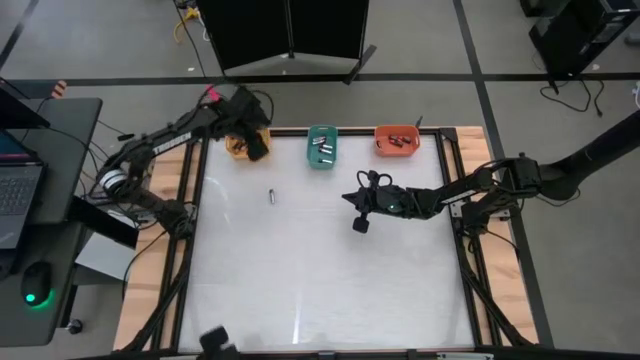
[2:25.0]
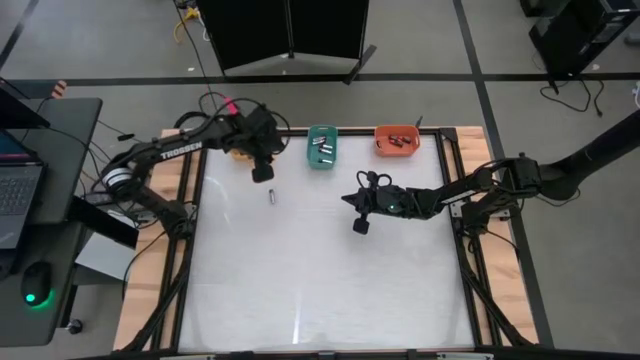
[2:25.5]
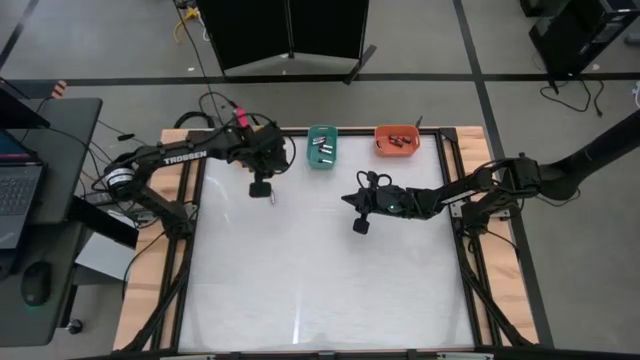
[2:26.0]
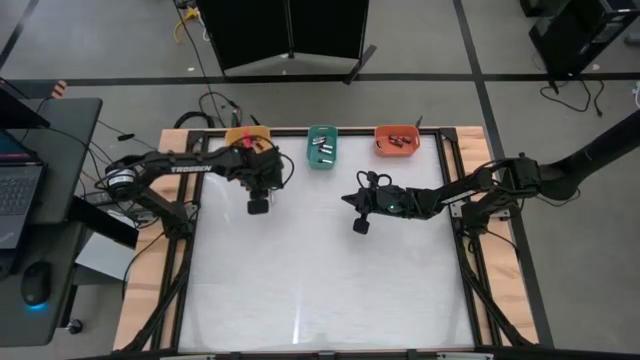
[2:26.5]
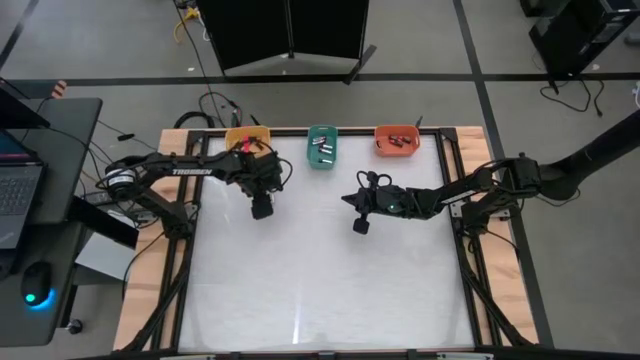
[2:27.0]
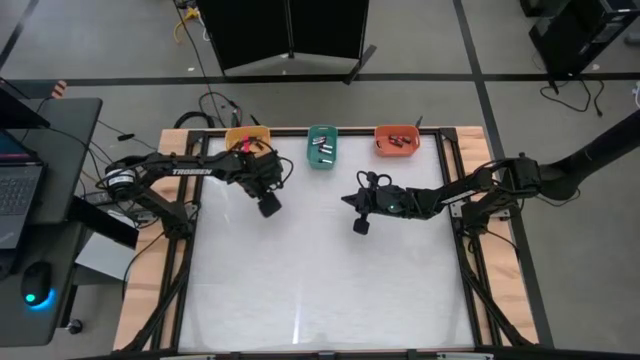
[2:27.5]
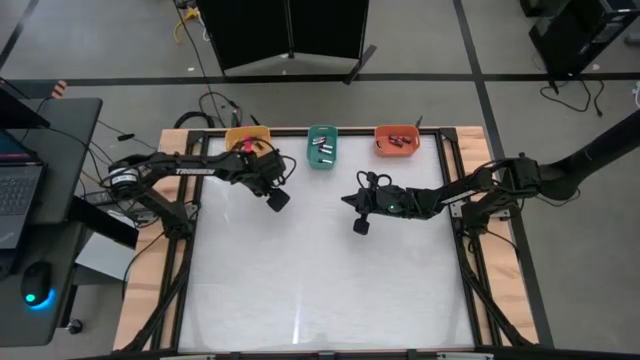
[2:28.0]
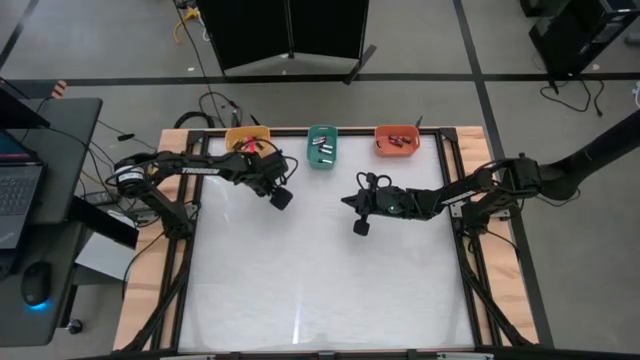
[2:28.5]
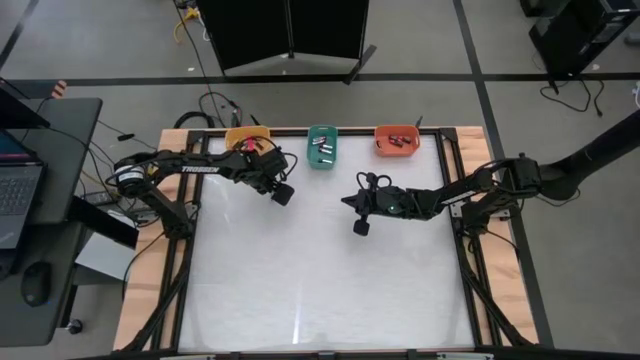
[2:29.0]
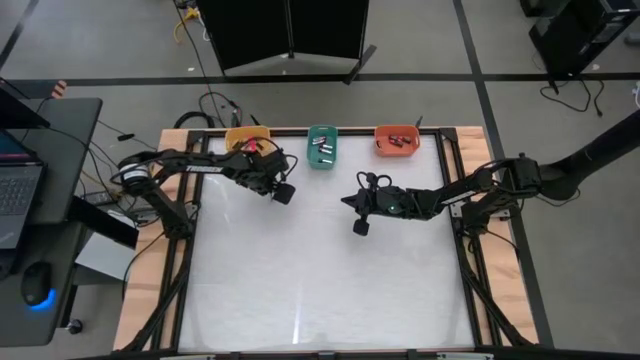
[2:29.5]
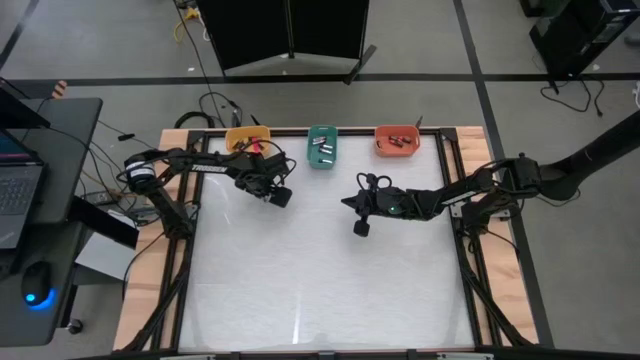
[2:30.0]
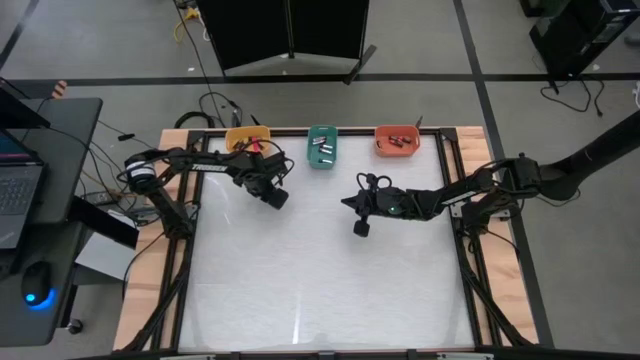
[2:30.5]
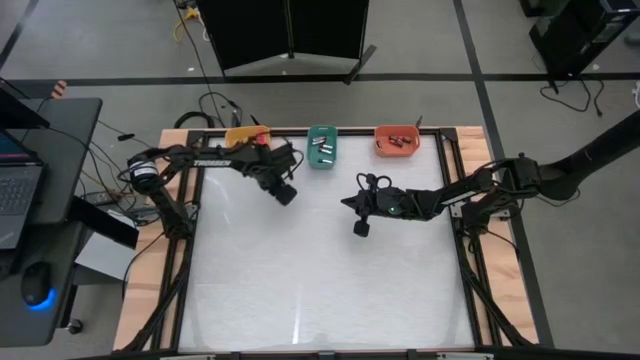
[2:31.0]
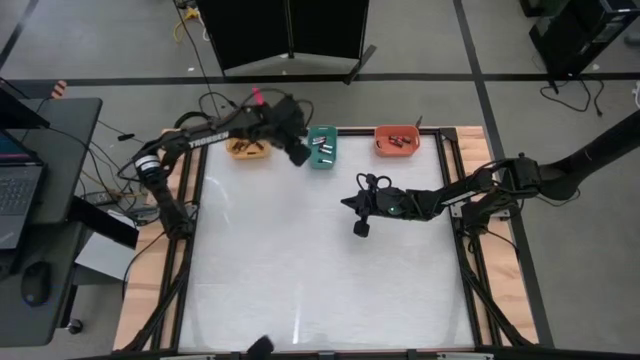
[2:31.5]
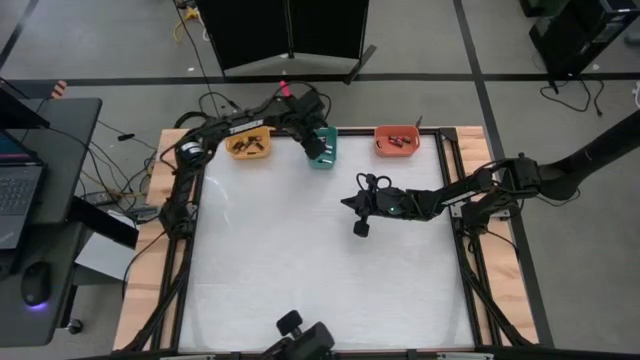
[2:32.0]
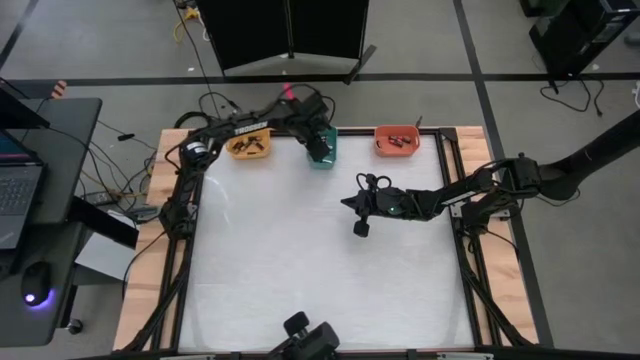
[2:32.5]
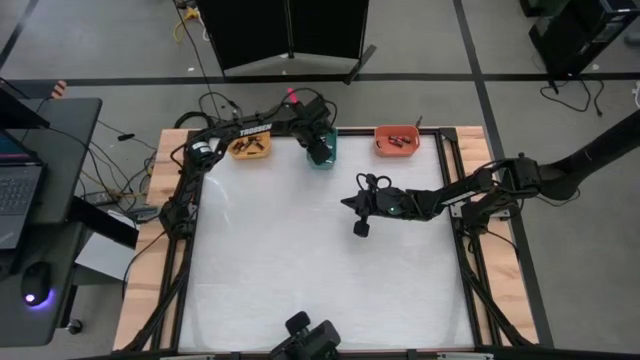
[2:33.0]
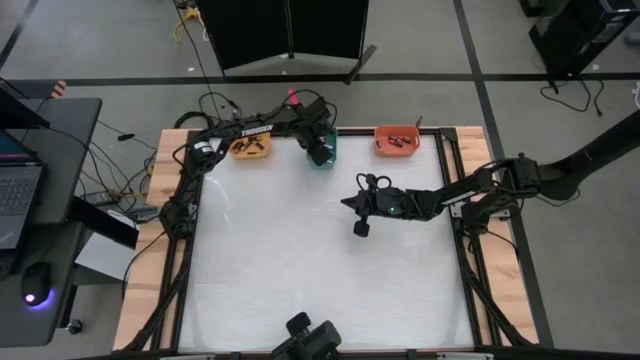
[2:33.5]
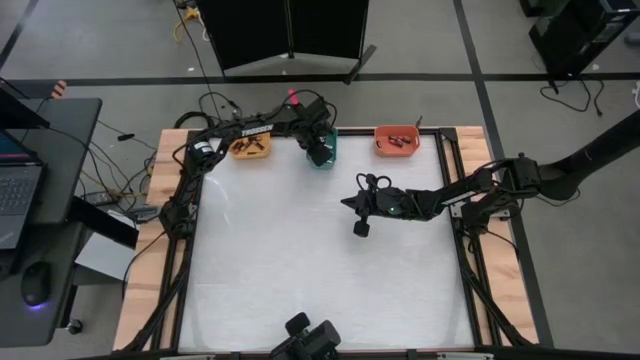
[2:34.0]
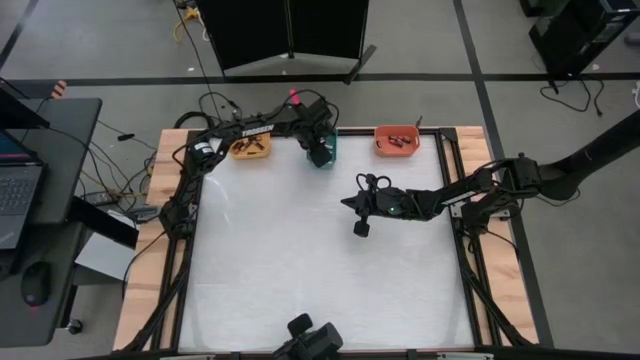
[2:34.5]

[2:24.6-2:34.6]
Task: Sort batteries
Put the silver battery into the green bin

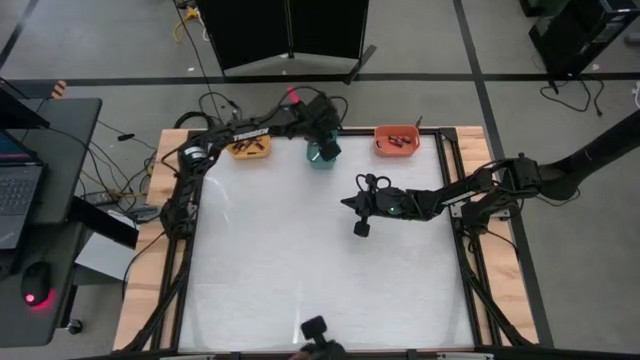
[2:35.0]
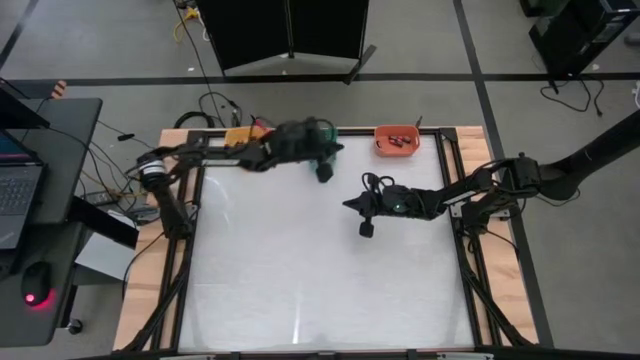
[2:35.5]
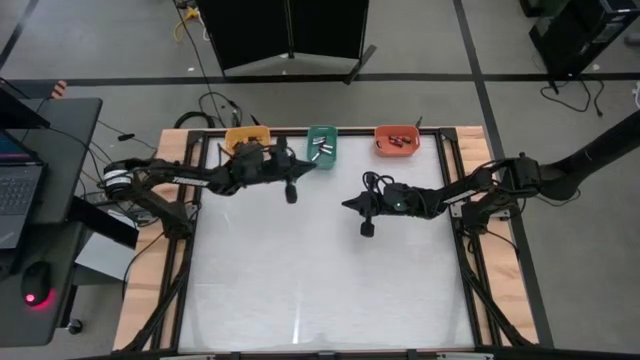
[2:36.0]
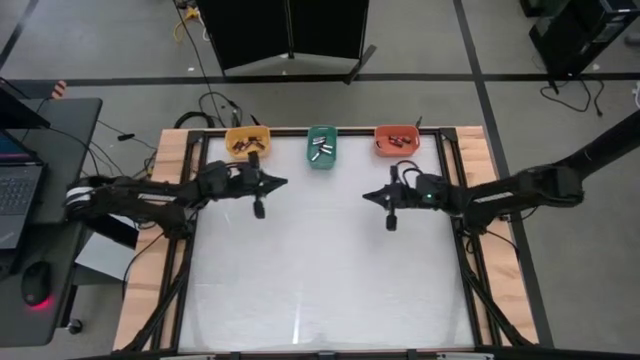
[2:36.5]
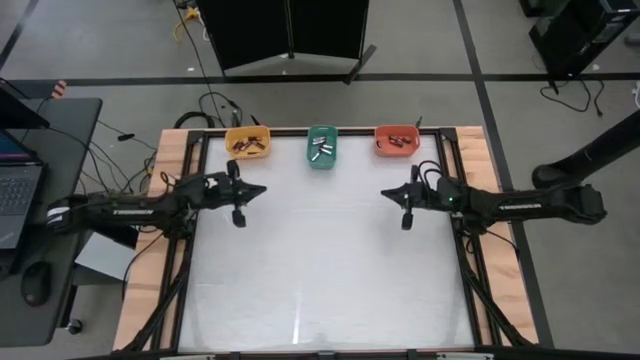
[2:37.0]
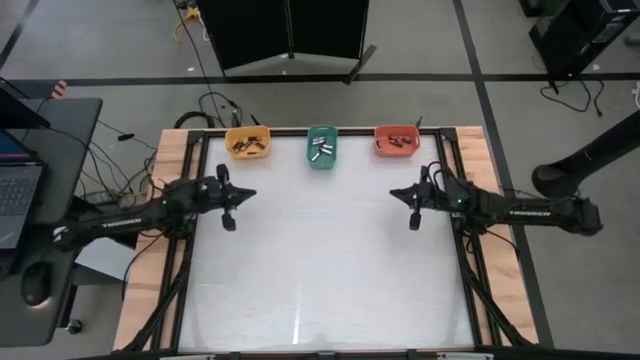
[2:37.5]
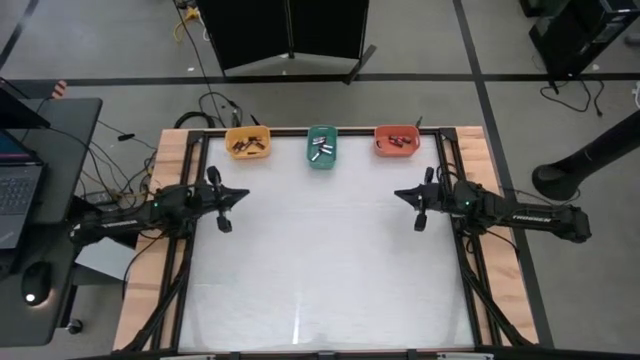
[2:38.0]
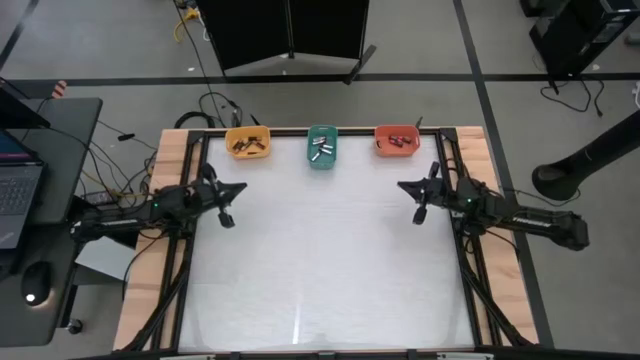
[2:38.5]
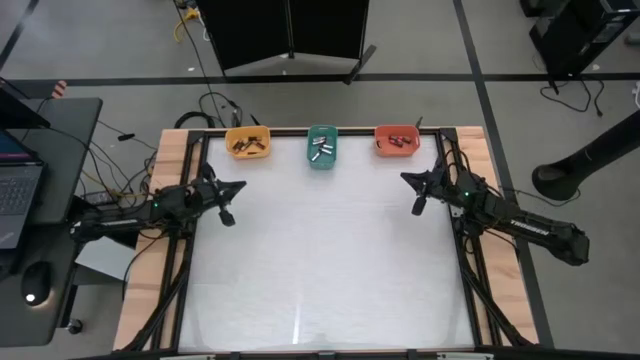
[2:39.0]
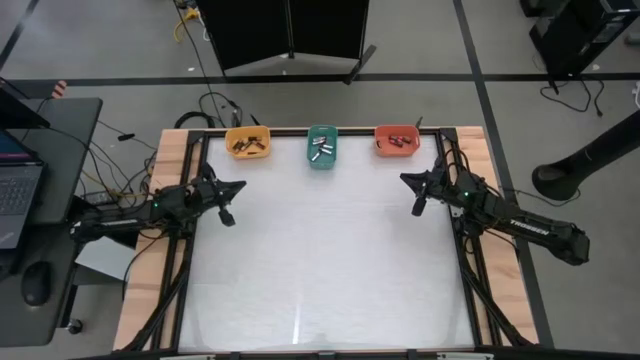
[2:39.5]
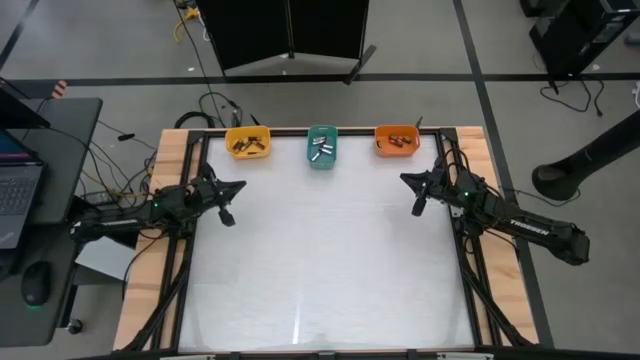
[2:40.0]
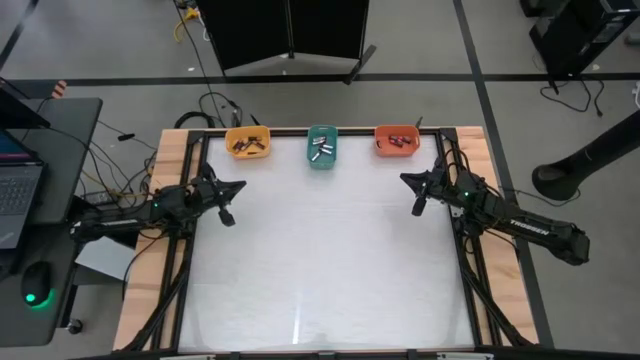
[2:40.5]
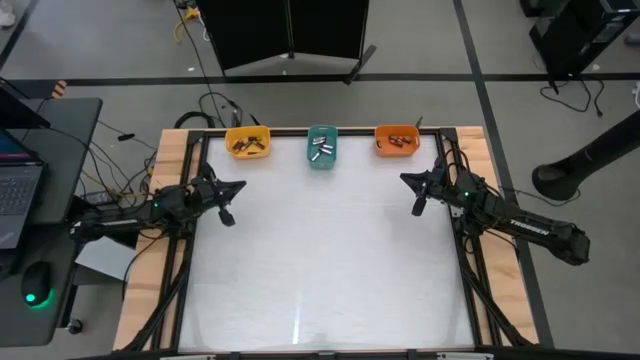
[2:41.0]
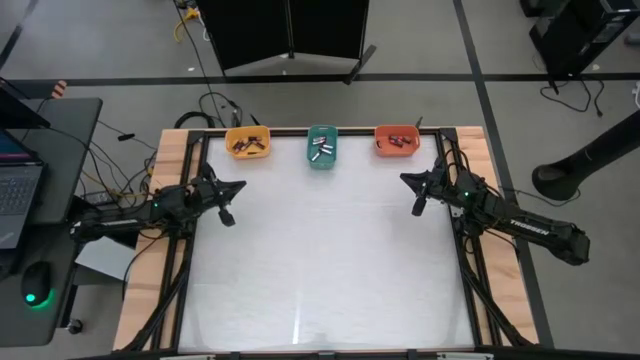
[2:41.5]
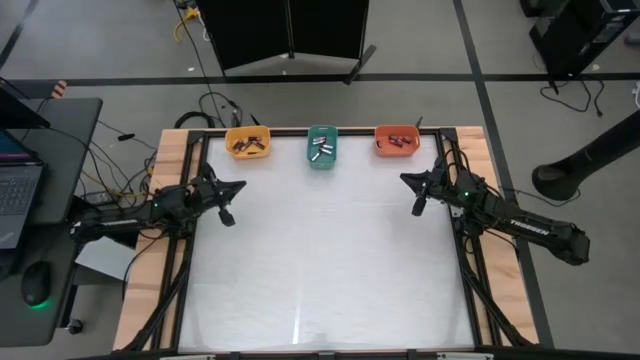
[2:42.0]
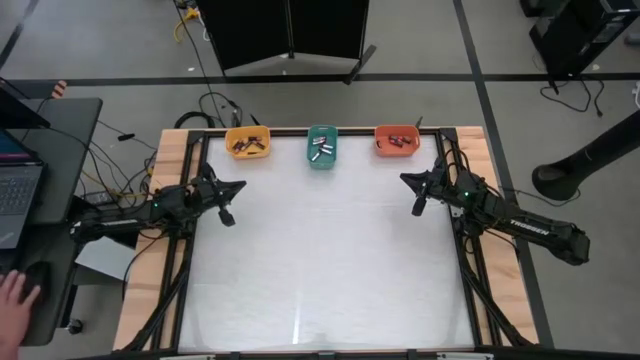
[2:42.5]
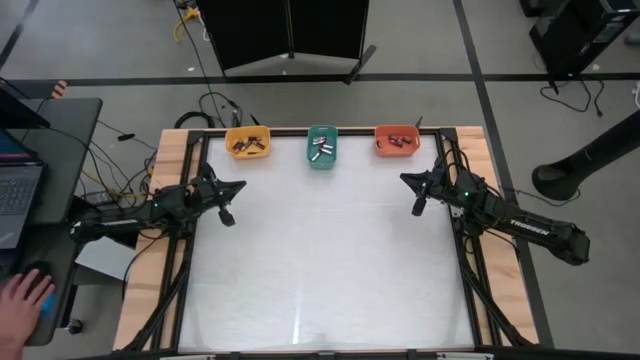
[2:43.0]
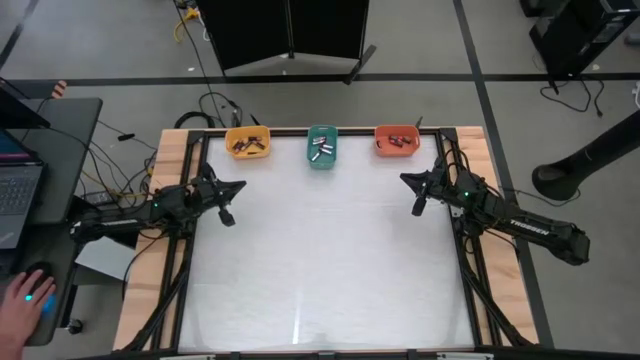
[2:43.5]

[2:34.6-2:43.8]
Return to Home Position

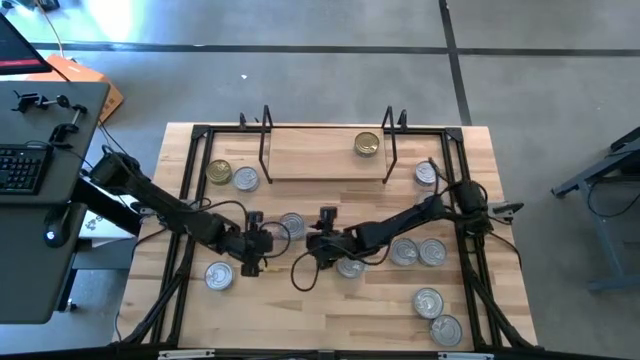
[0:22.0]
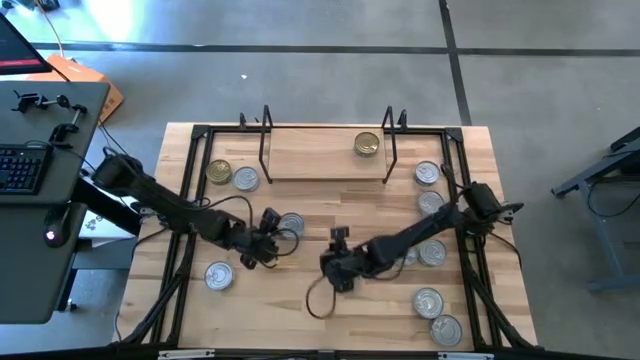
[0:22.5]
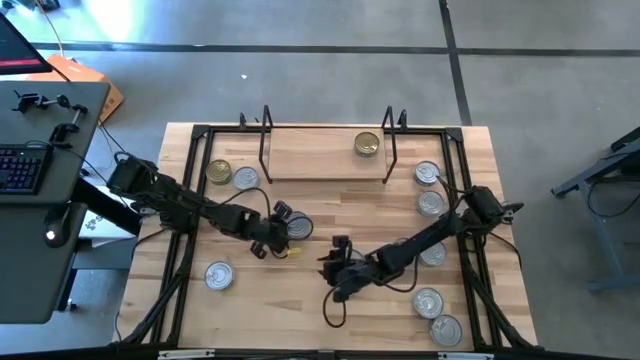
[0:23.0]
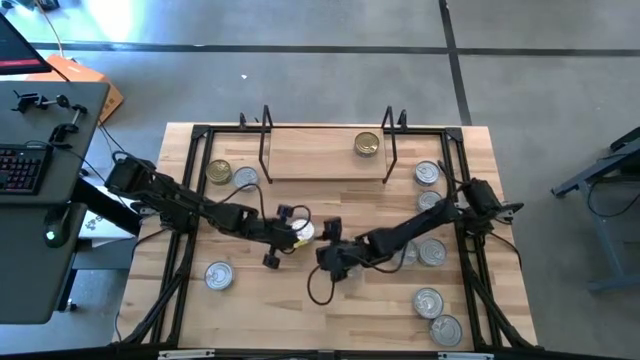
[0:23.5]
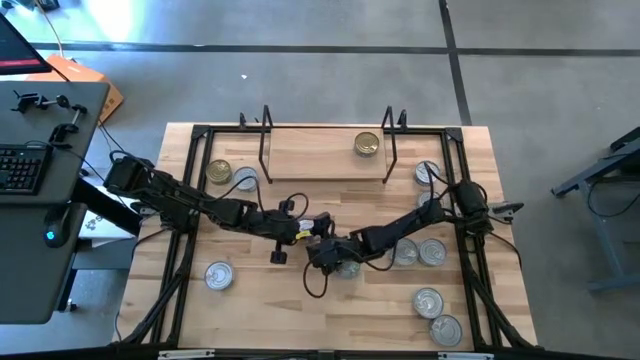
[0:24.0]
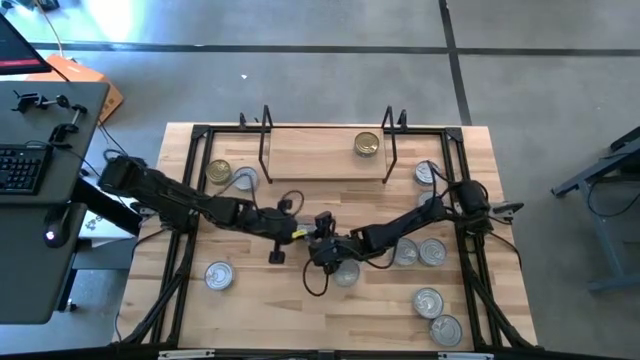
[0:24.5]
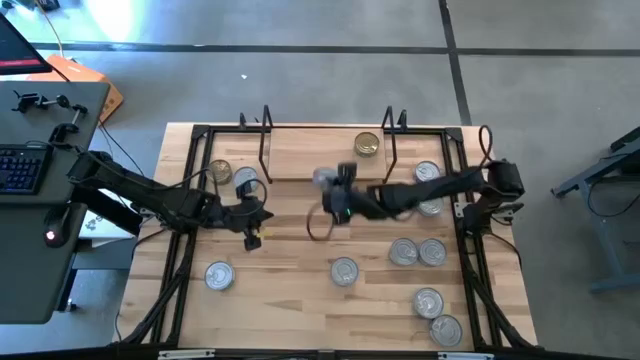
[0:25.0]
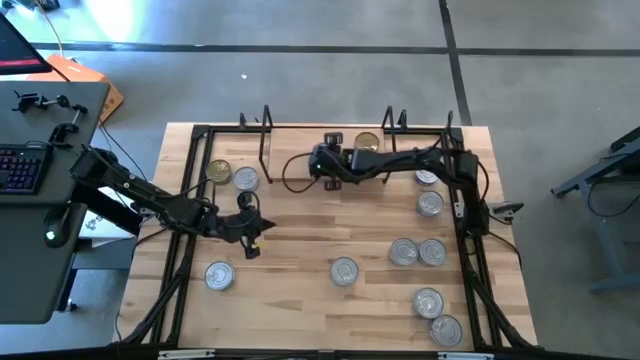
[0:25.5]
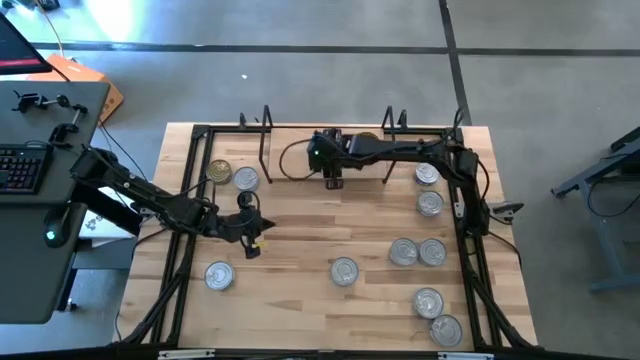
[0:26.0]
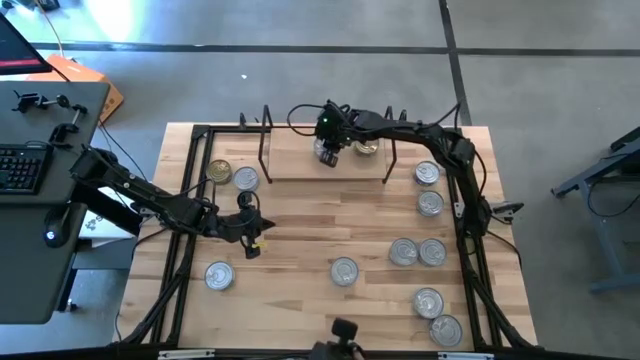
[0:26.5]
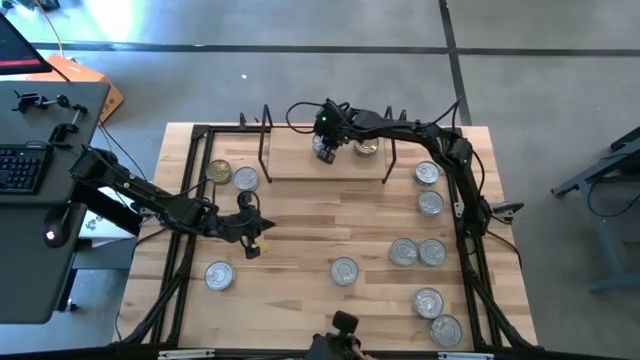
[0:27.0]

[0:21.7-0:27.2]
Task: Stack canned seafood by type on shelf
Put the light blue tuna can on the shelf
